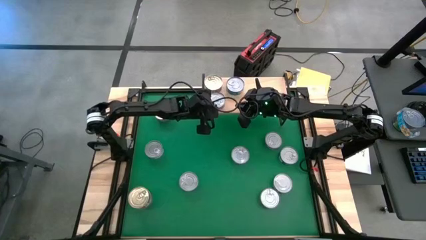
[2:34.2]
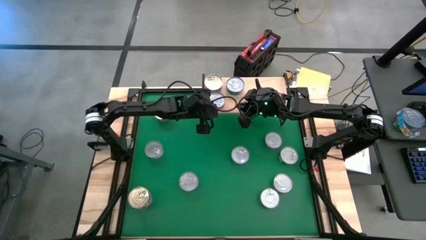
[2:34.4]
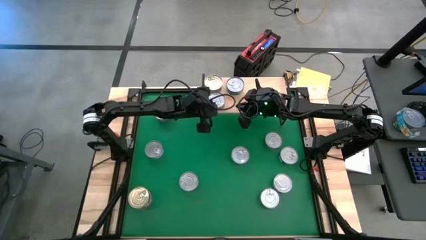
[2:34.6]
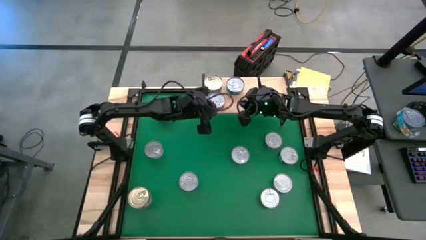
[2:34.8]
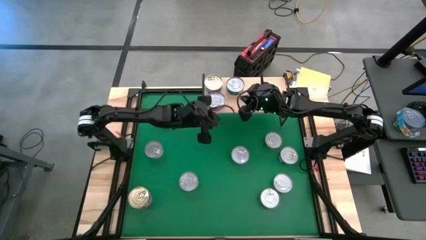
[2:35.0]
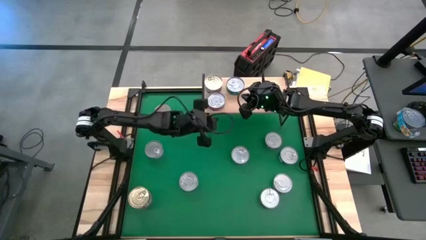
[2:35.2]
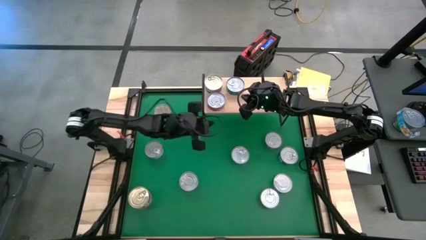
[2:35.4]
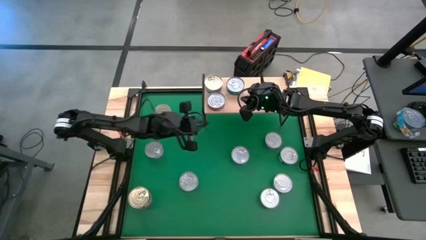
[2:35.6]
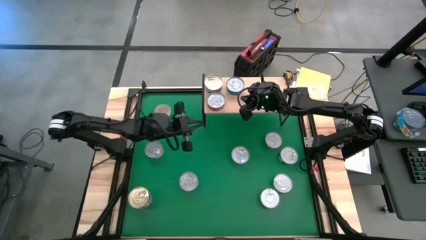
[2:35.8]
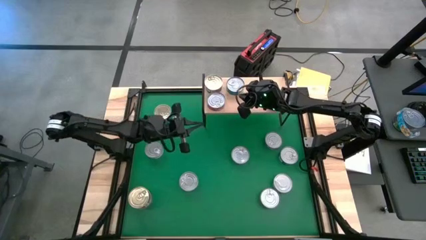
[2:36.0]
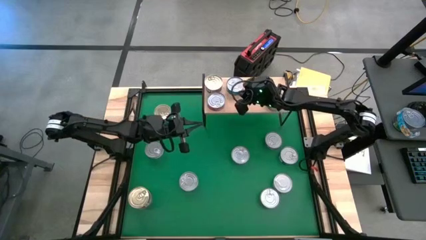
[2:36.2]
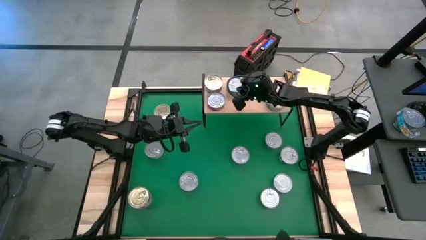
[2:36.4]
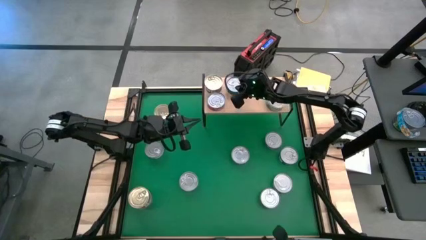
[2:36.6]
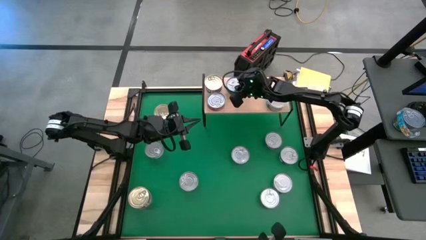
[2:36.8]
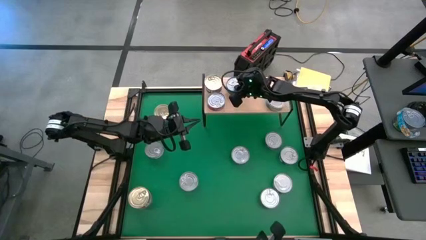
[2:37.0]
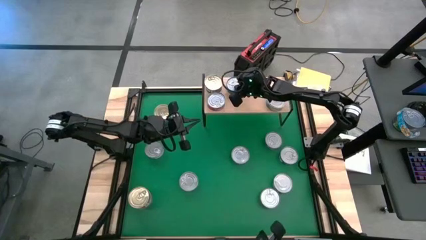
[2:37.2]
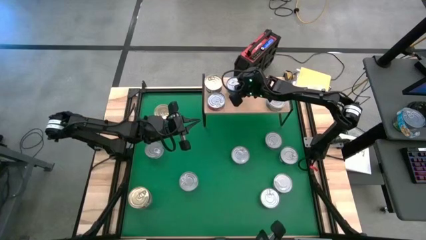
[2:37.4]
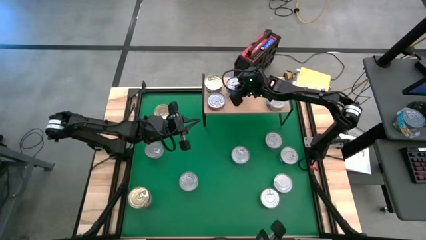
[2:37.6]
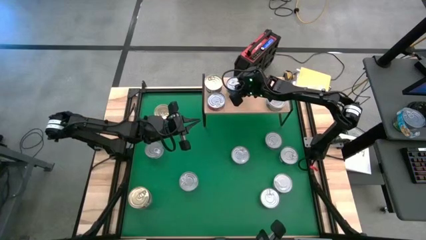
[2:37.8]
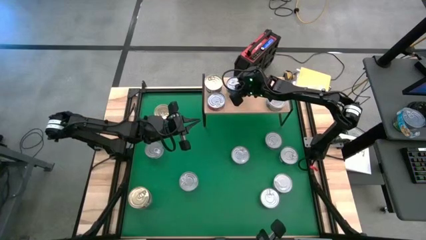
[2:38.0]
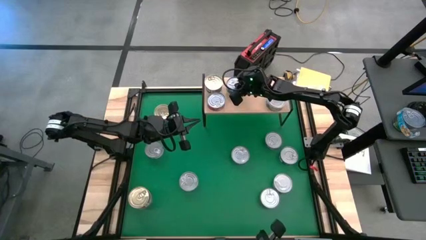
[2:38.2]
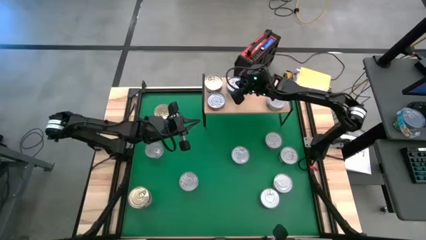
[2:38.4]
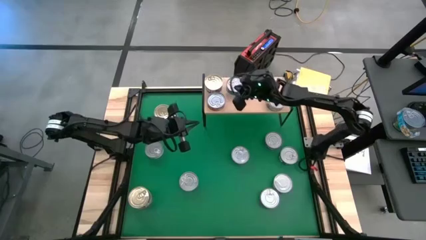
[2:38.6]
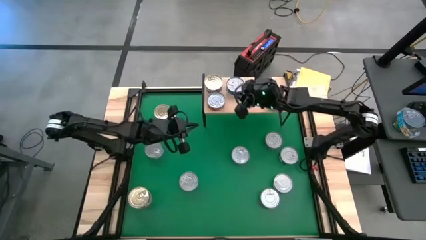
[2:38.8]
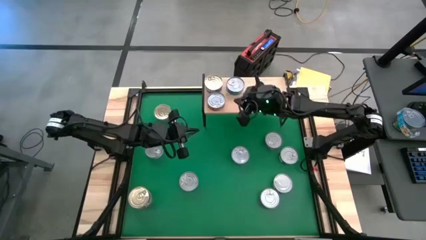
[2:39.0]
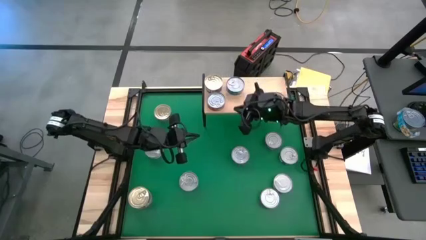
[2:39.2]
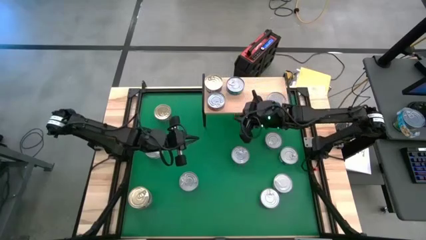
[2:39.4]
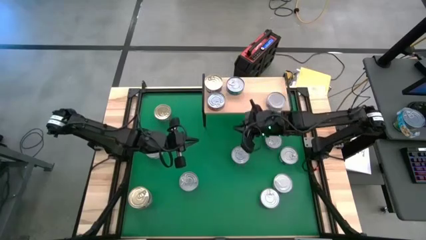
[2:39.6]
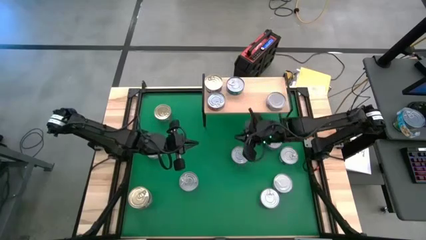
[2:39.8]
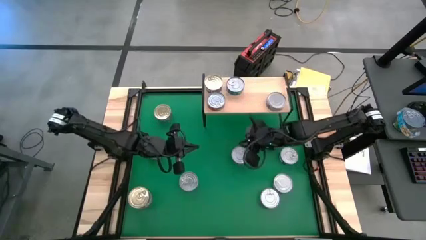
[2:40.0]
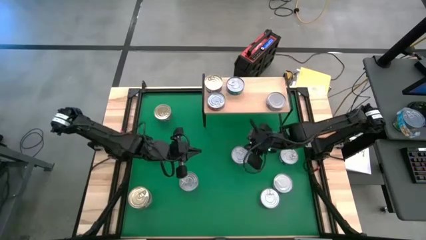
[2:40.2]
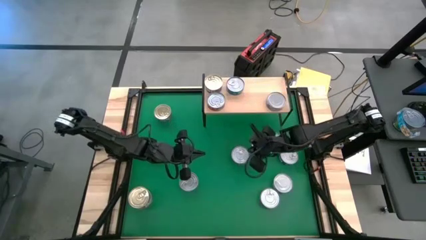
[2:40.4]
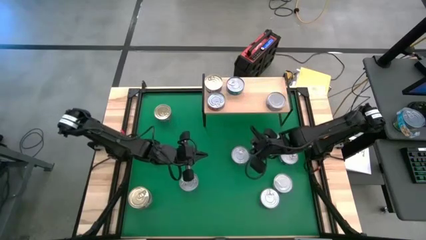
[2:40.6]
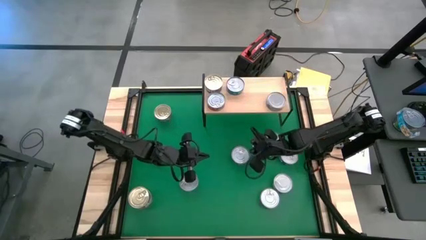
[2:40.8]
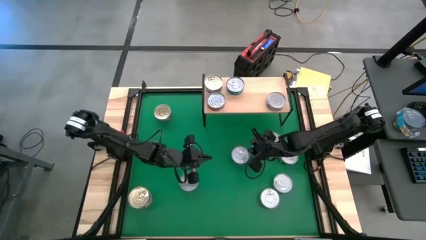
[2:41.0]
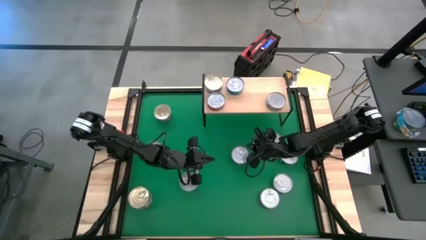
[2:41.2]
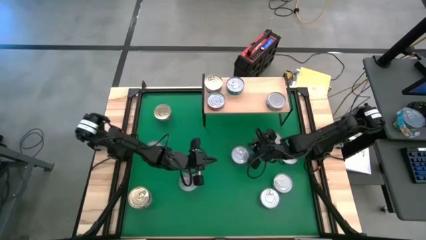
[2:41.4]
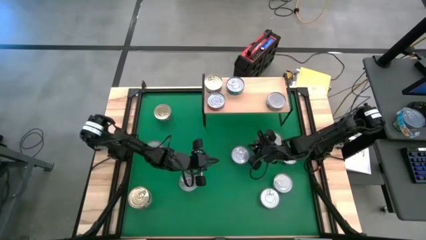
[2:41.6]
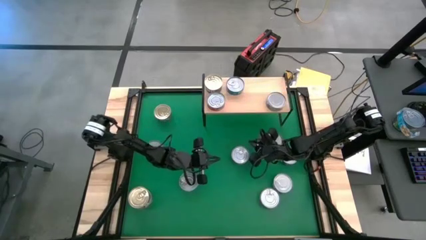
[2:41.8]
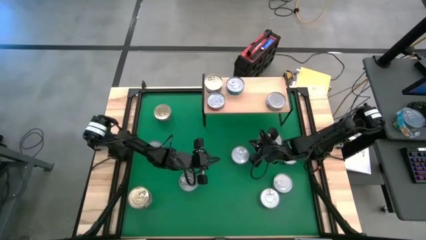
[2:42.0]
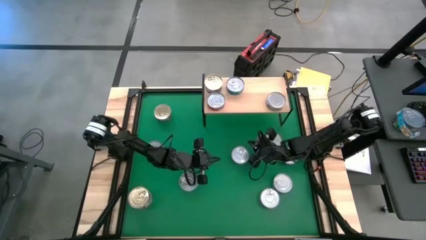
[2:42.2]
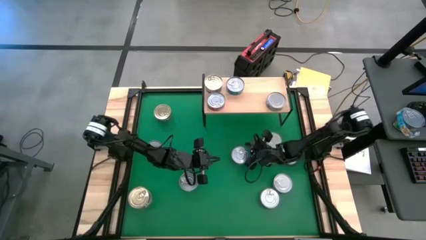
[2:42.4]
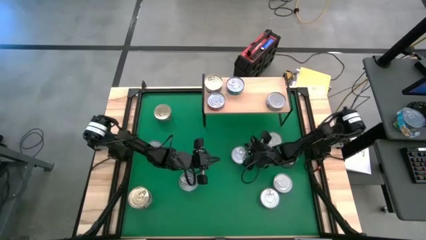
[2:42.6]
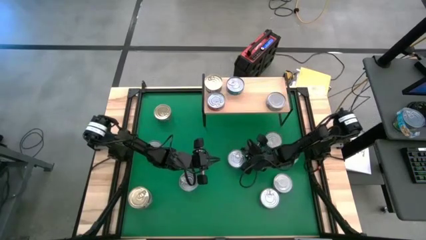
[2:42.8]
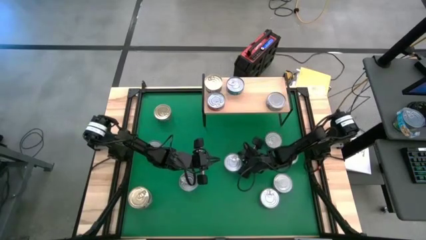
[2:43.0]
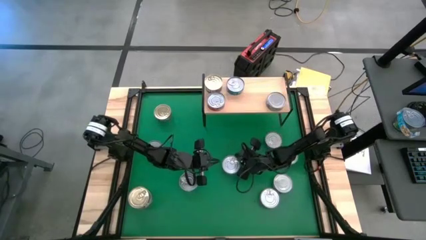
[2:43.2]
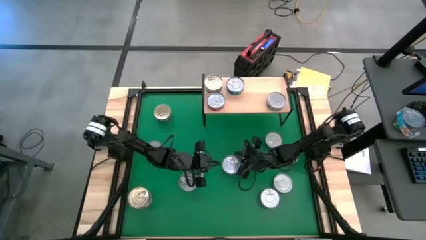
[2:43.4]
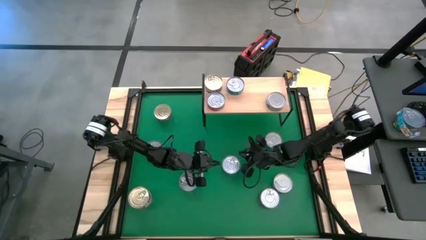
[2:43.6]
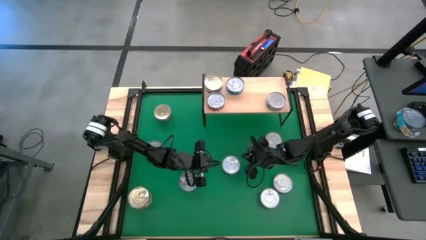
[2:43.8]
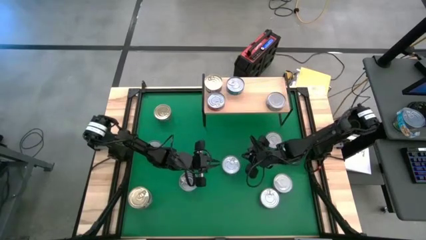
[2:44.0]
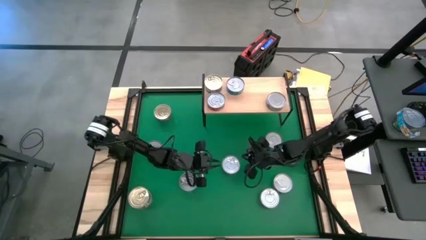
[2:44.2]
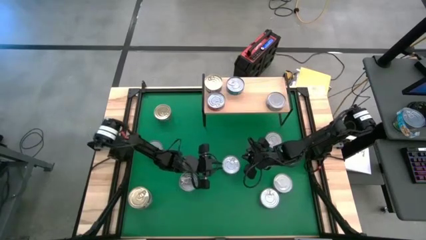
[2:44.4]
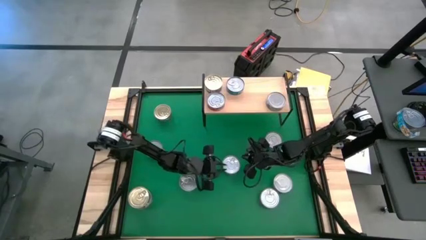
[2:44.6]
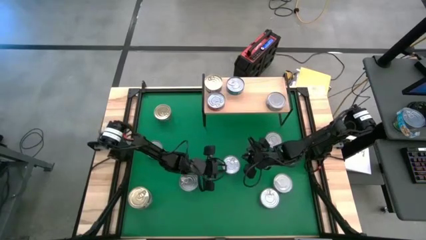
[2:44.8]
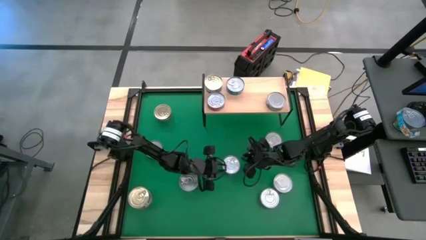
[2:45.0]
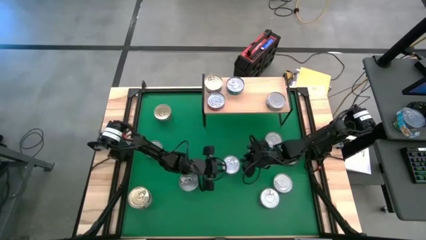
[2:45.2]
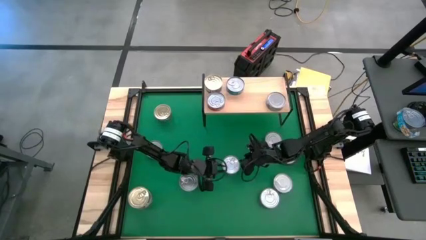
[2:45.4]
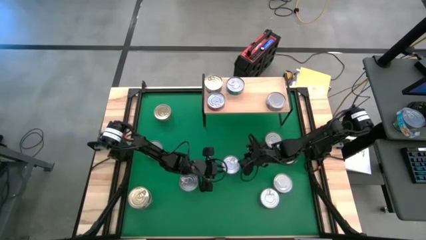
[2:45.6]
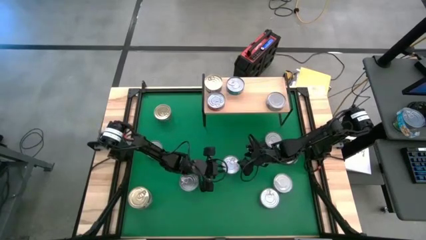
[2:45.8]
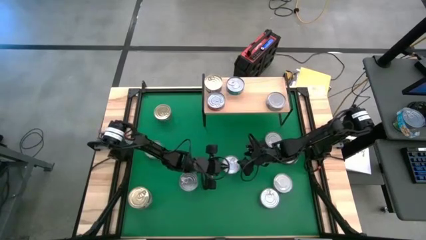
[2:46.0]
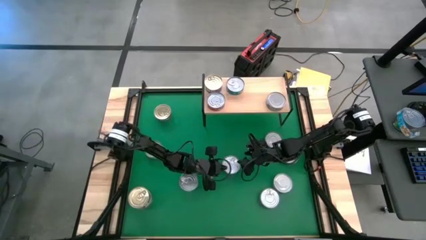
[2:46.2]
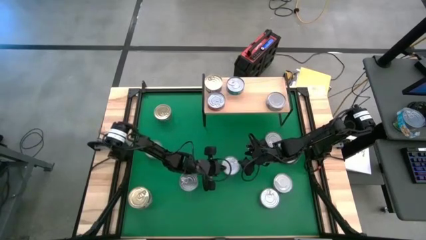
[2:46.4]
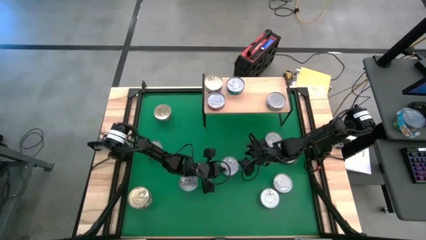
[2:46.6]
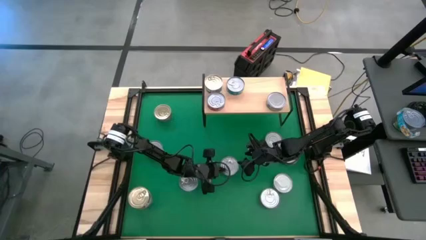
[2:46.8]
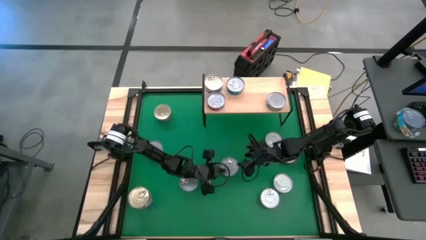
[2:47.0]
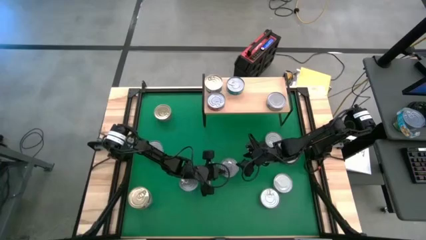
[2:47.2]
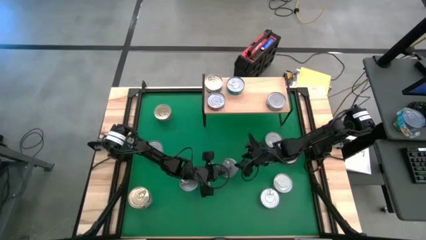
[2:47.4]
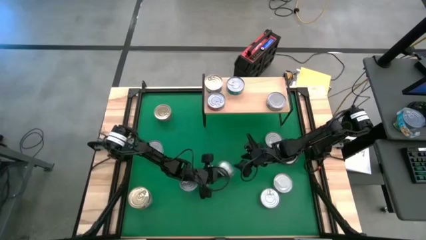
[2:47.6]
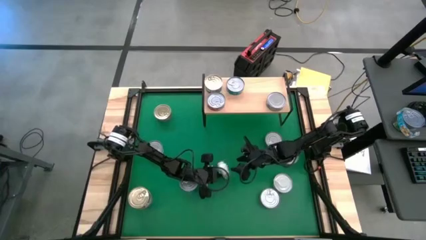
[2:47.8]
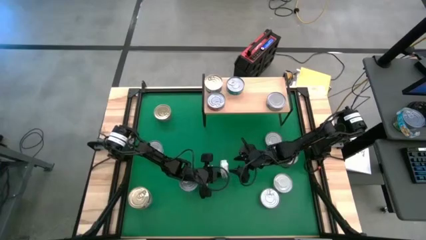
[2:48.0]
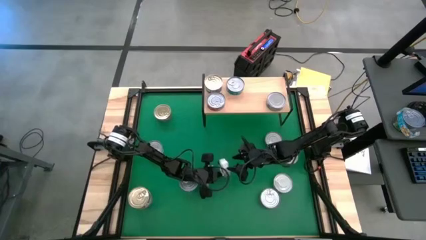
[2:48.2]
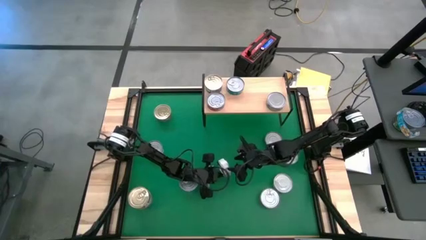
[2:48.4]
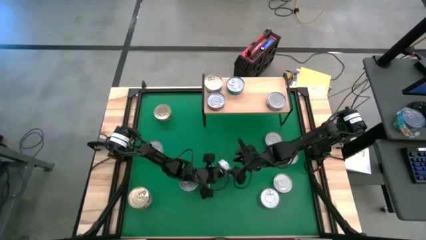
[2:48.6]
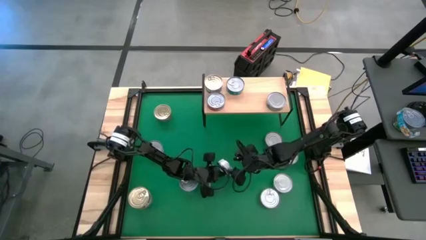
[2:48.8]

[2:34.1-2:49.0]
Task: Stack canned seafood by type on shelf
Put the green tuna can on the shelf
